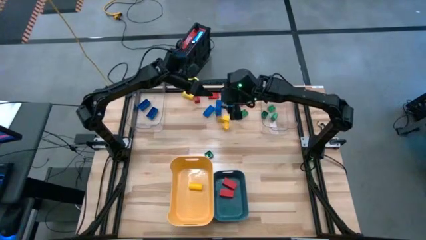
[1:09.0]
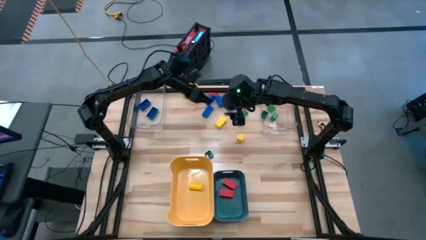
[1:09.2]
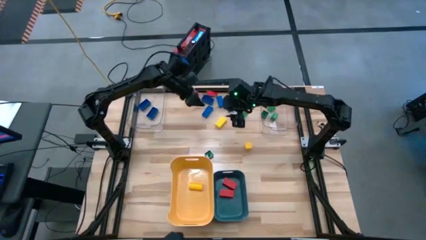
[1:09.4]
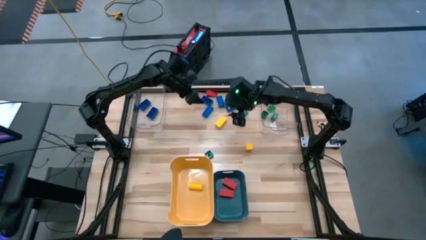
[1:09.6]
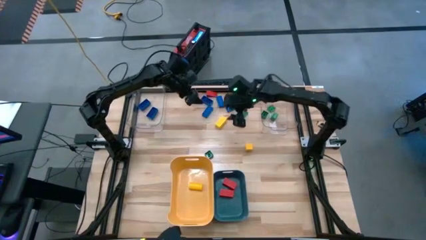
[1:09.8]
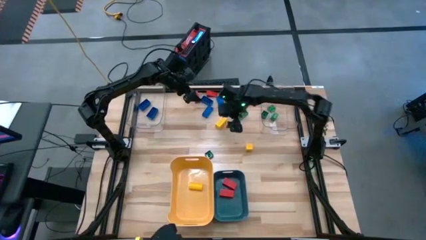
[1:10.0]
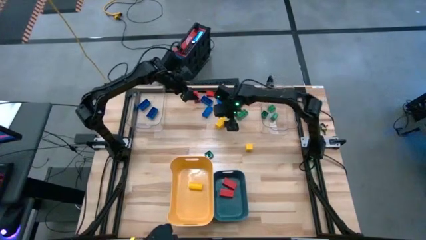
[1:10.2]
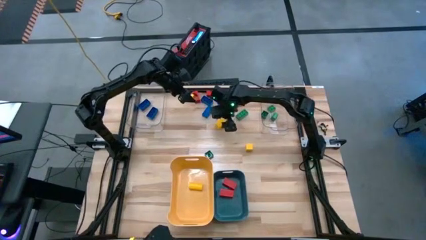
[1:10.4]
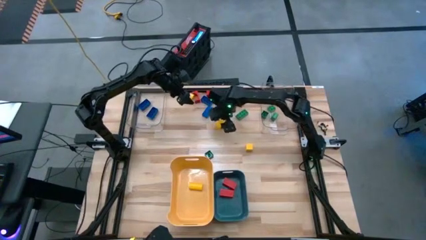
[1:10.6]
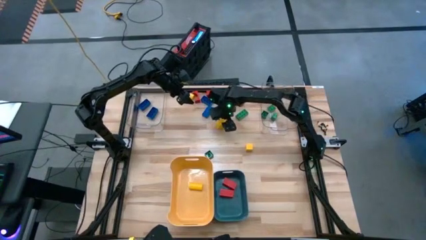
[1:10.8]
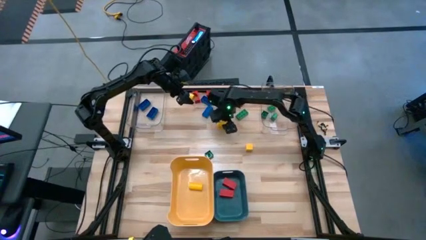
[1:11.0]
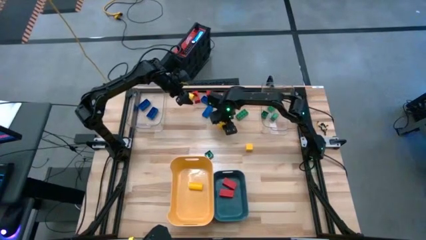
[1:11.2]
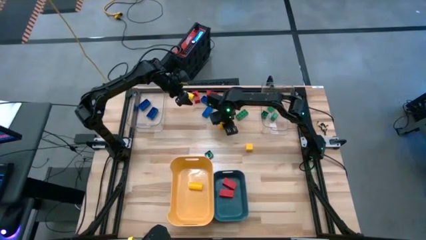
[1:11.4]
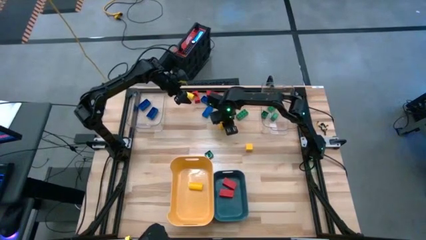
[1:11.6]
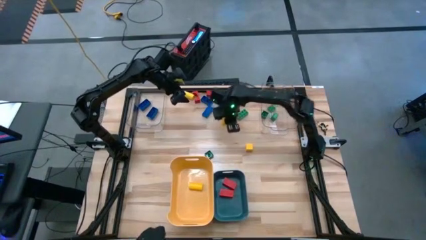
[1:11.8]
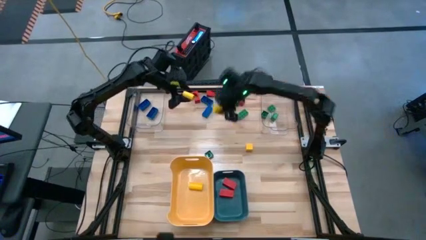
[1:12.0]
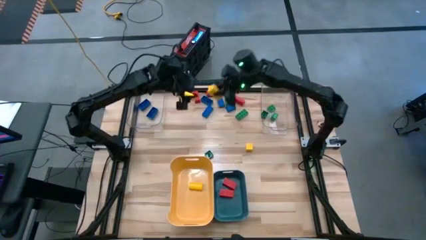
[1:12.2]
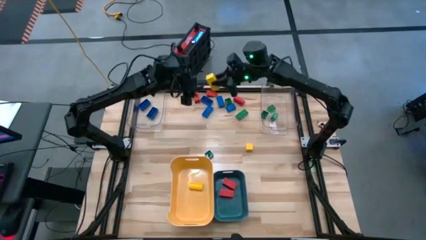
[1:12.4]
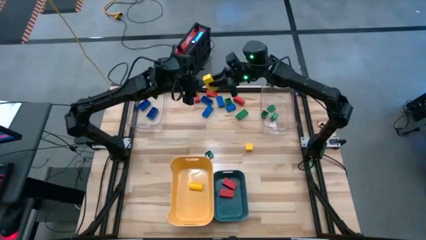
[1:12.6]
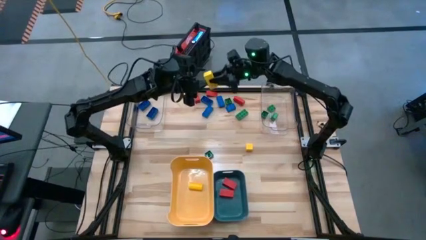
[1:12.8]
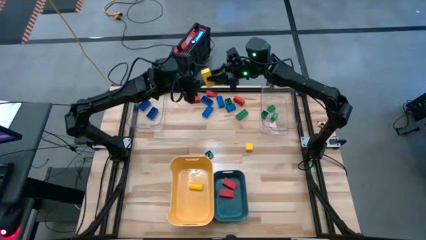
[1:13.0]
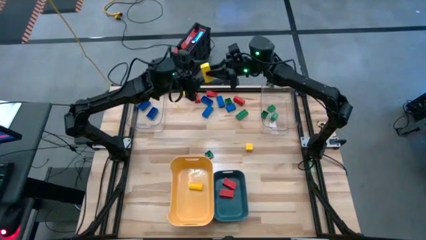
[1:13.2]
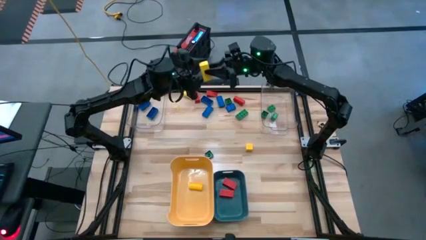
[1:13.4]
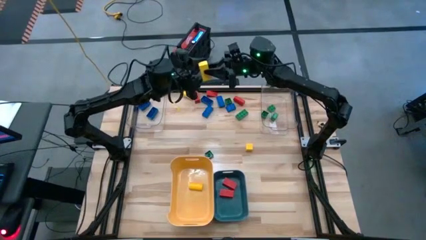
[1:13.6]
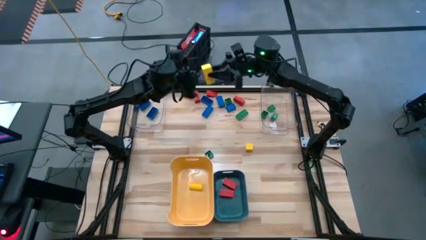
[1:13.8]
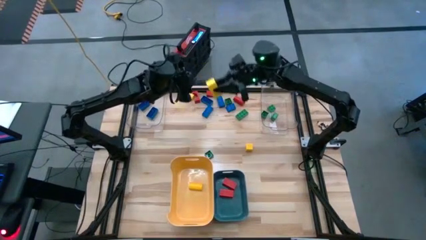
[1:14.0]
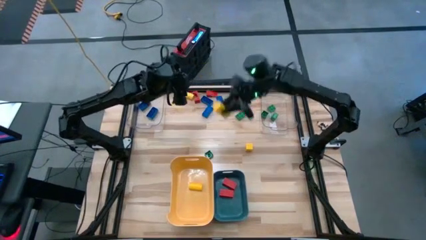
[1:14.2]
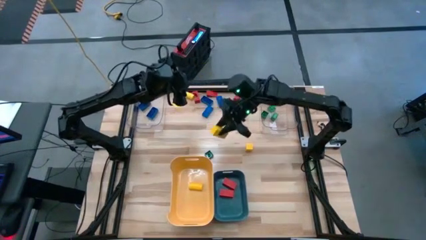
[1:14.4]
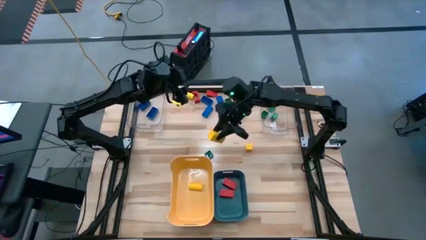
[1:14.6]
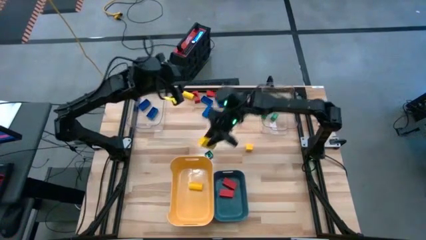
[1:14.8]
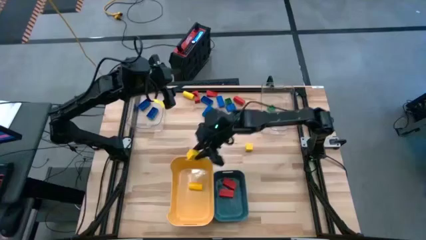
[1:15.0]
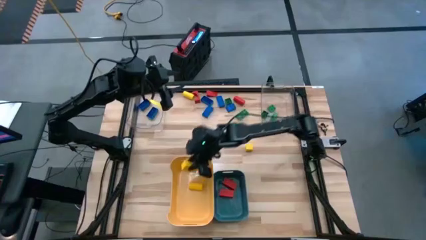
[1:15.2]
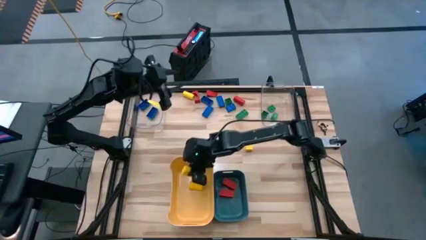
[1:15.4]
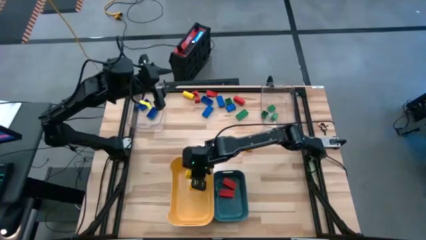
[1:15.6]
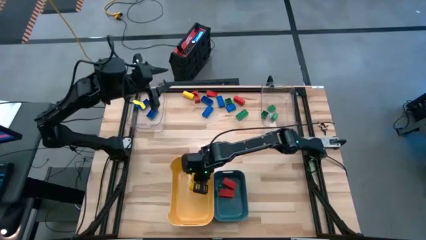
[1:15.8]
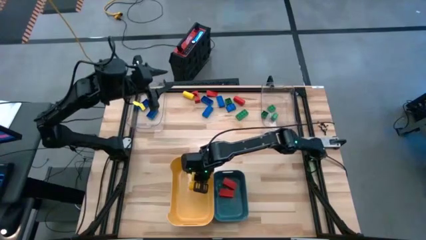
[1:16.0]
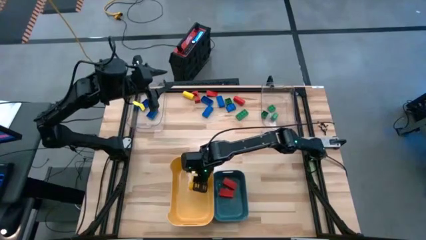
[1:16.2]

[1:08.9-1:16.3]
Task: Sort blocks
Put the yellow block into the yellow bin

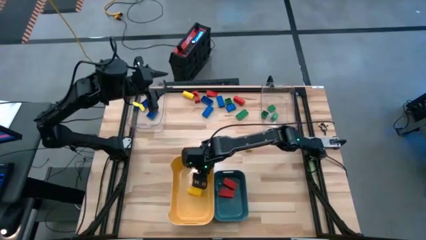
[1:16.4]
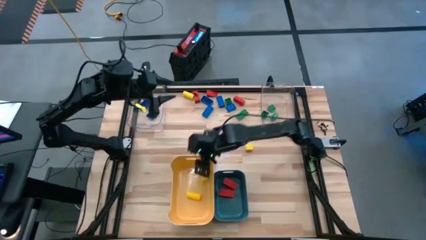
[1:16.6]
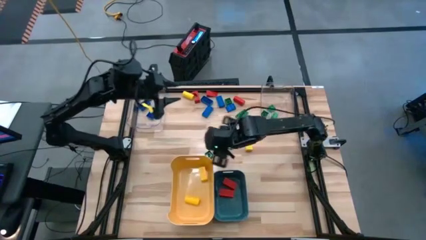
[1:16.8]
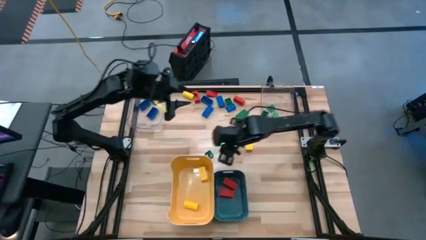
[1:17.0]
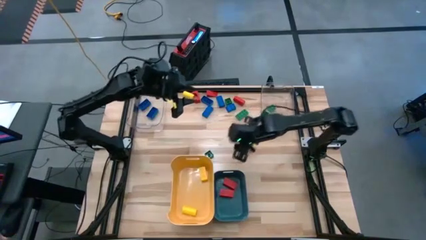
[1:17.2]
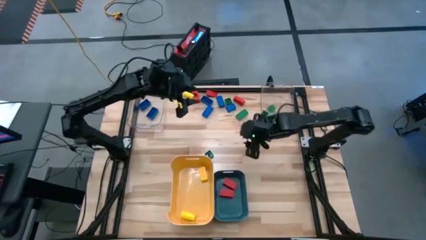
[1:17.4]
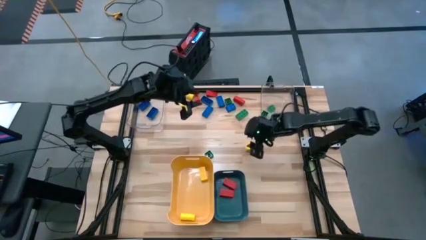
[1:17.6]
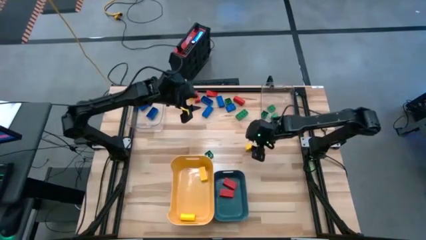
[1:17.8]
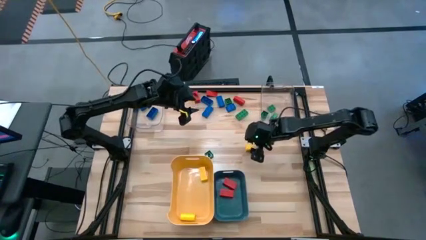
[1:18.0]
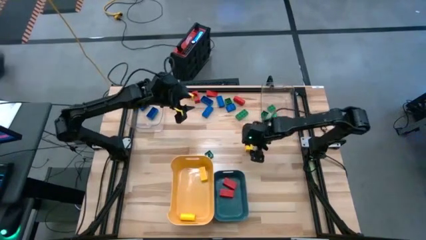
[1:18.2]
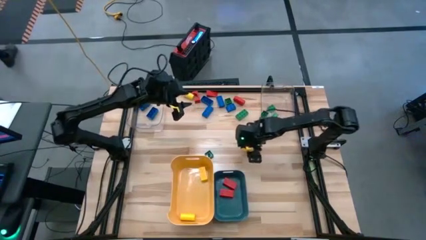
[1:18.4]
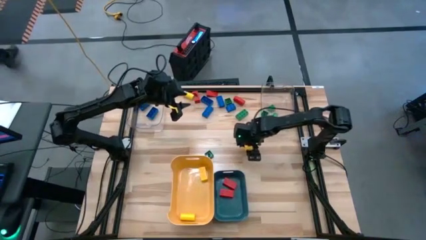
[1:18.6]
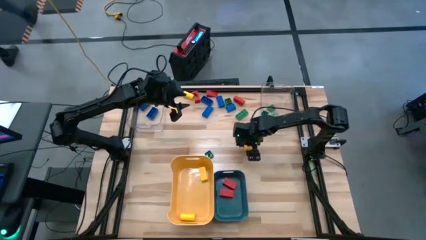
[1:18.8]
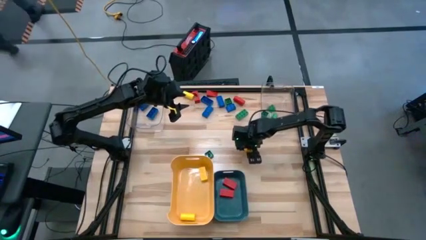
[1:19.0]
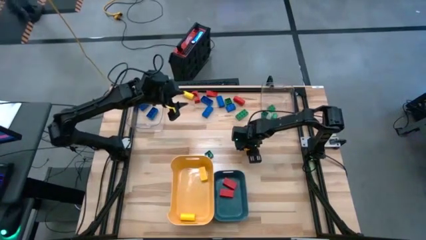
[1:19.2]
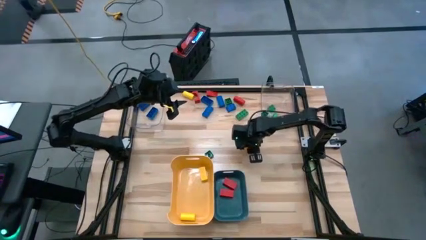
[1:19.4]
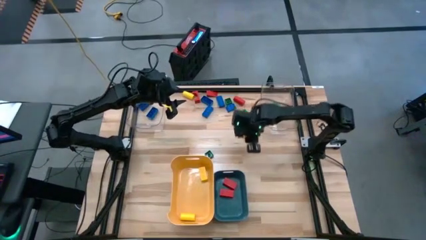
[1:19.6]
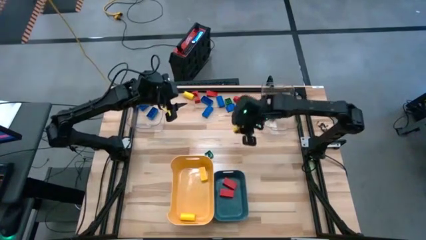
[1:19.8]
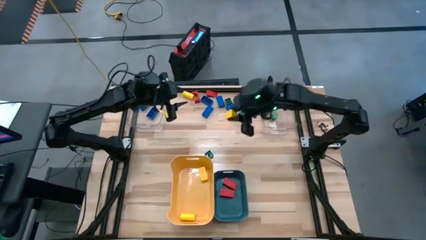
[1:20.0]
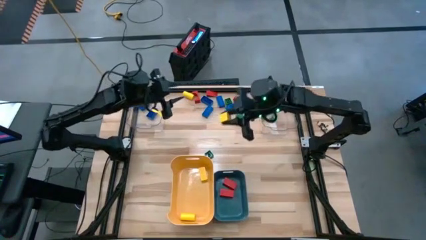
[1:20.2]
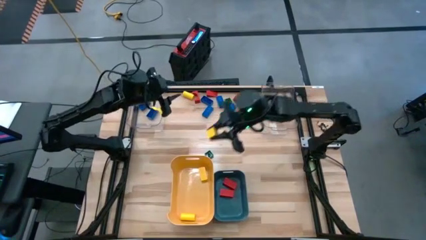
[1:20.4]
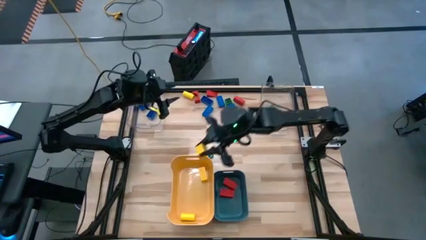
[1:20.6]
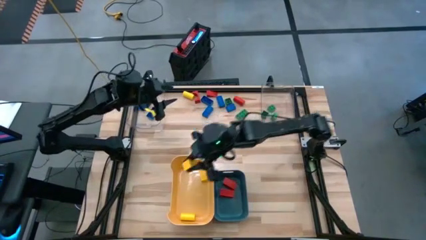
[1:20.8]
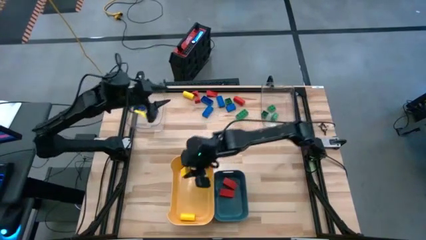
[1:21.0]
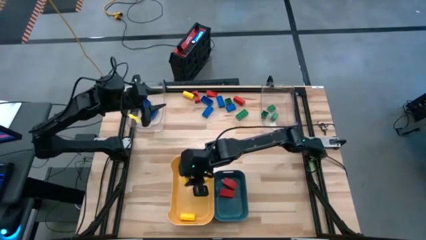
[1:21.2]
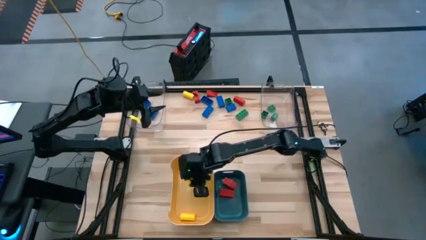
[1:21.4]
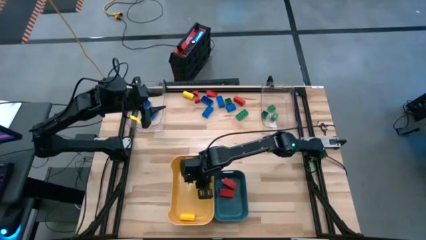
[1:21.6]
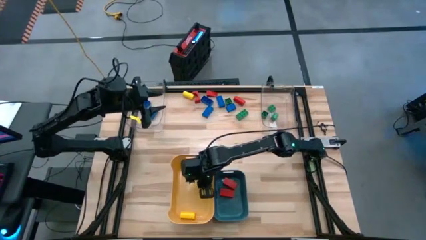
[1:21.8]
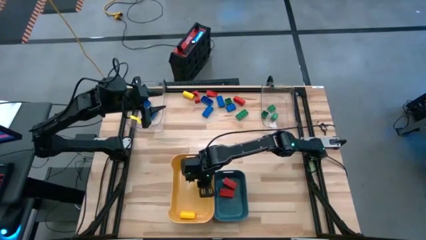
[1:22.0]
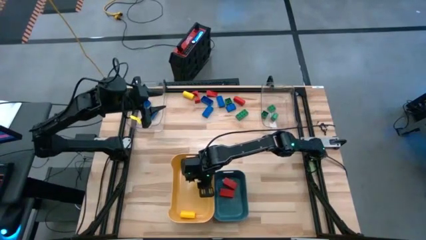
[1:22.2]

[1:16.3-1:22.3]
Put the yellow block into the yellow bin

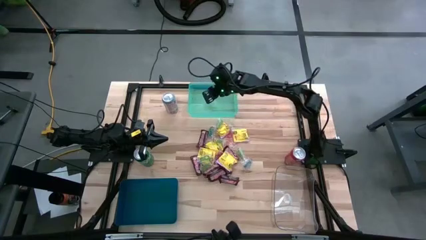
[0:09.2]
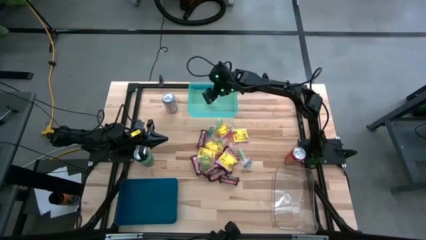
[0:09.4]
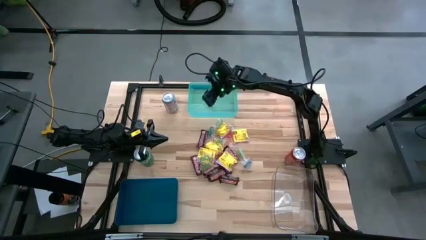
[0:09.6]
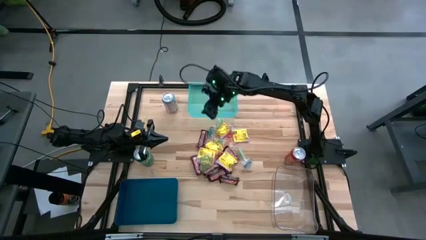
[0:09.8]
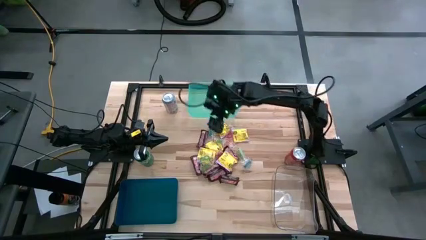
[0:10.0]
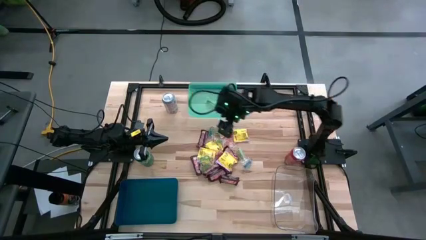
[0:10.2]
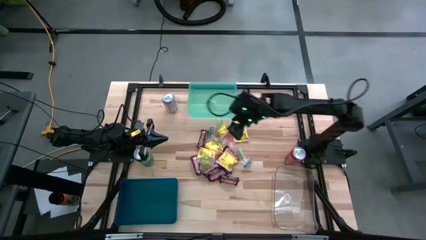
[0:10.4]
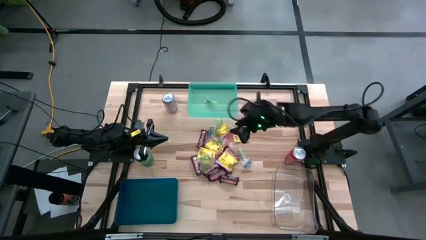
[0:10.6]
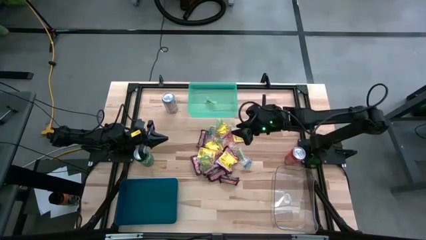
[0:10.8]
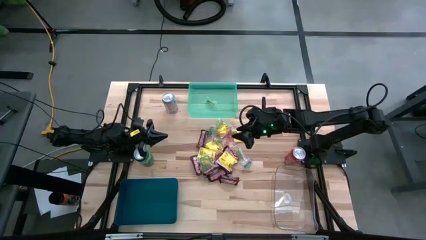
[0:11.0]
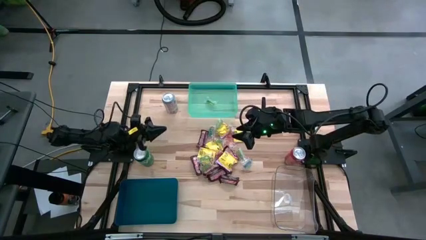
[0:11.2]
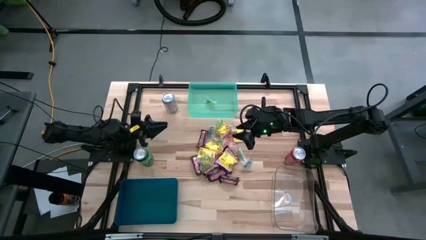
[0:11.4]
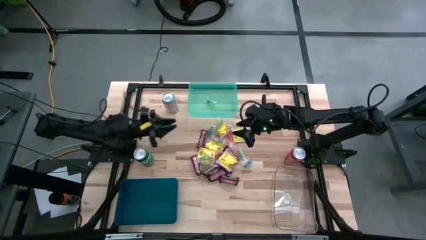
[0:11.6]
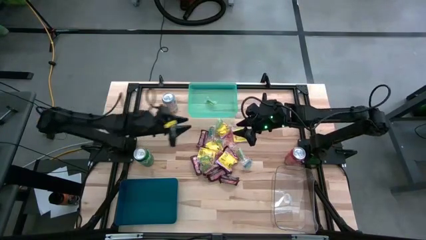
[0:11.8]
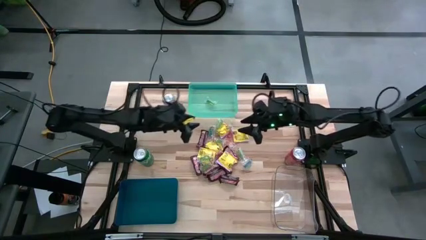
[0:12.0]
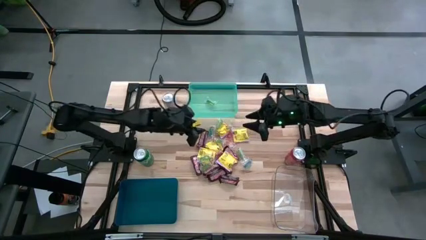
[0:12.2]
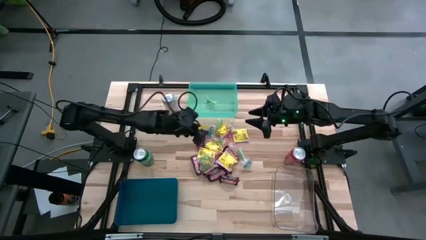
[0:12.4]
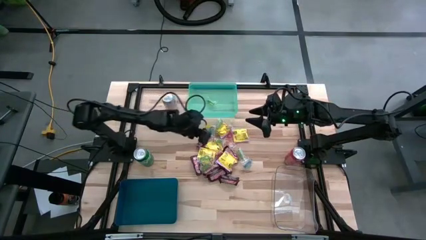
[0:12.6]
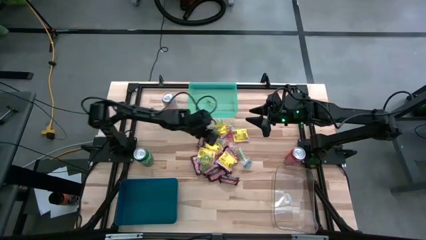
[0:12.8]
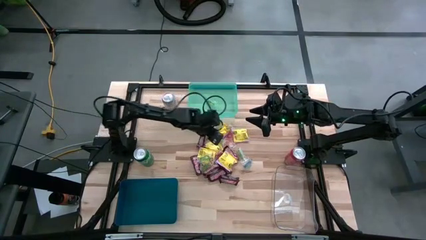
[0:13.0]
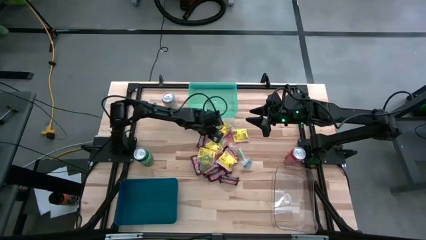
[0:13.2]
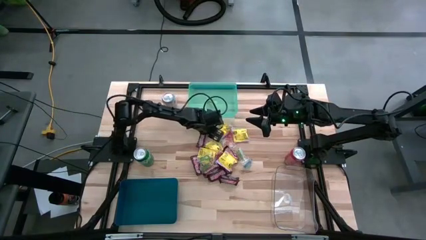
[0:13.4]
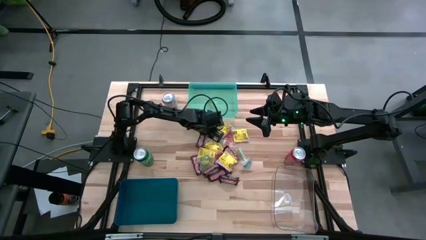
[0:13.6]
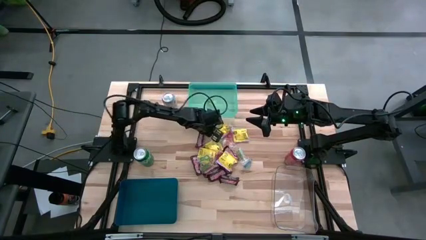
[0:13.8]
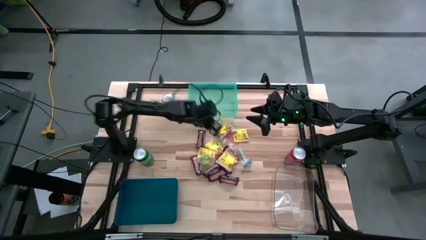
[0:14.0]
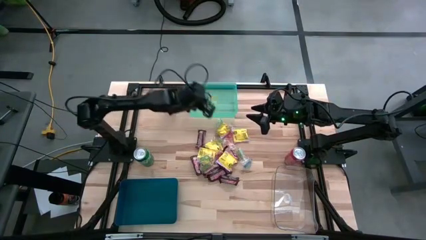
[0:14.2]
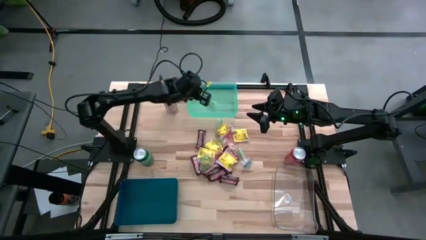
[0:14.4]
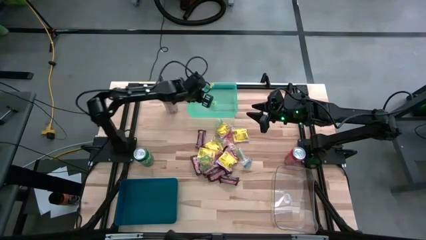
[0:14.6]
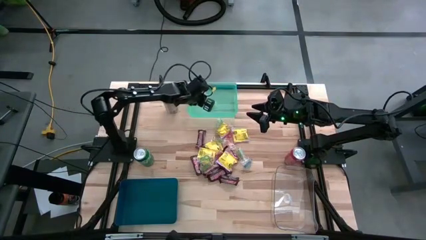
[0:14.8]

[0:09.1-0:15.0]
Task: Sort candy
Put the blue gummy into the light blue bin
